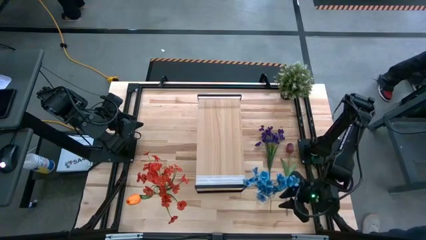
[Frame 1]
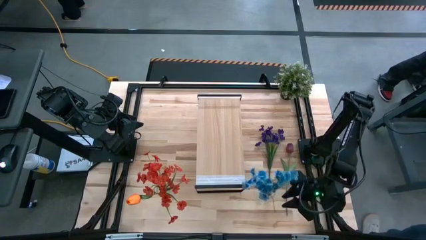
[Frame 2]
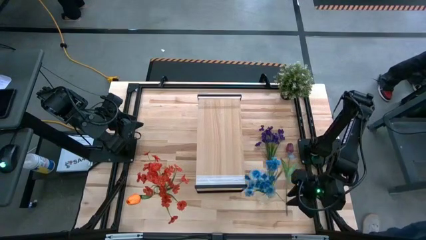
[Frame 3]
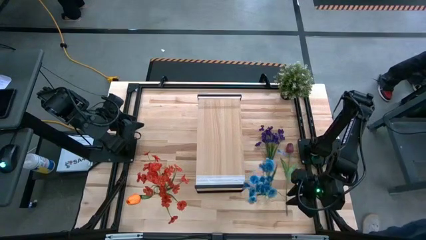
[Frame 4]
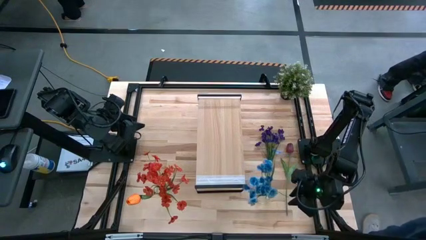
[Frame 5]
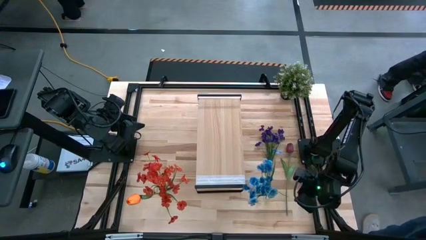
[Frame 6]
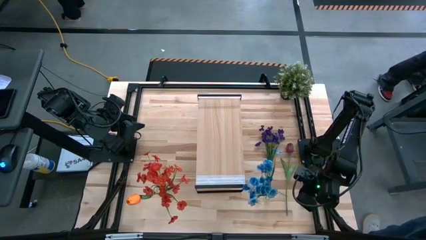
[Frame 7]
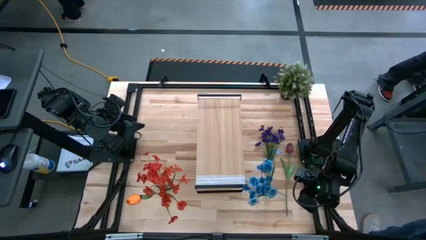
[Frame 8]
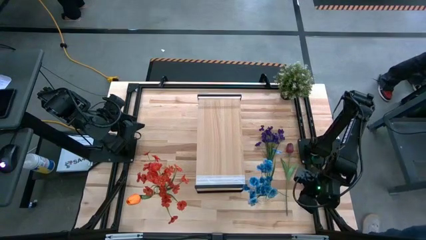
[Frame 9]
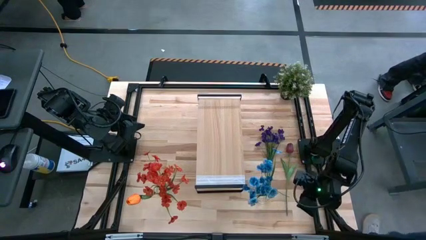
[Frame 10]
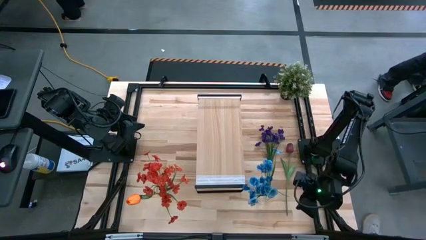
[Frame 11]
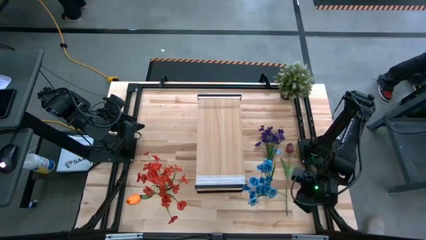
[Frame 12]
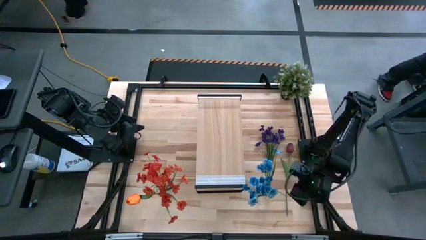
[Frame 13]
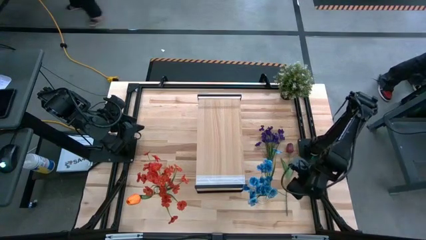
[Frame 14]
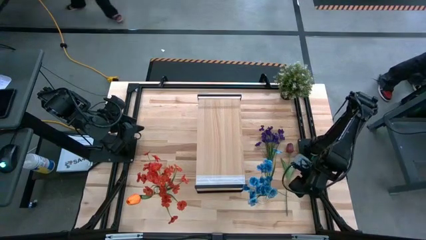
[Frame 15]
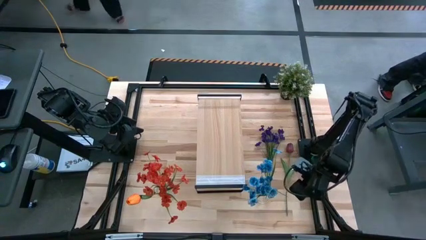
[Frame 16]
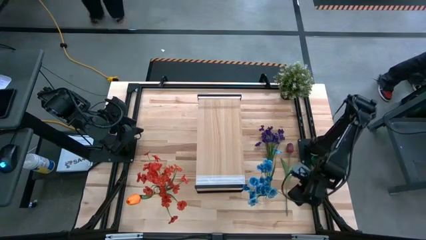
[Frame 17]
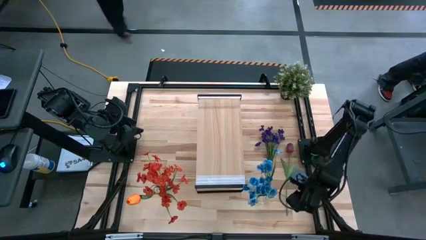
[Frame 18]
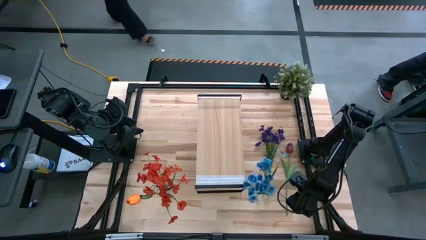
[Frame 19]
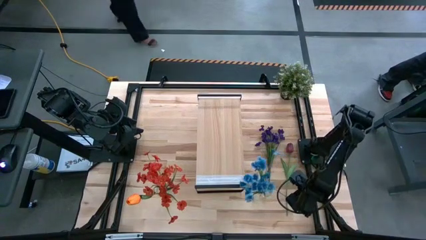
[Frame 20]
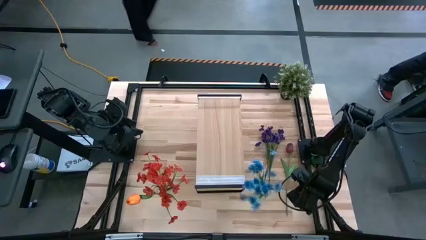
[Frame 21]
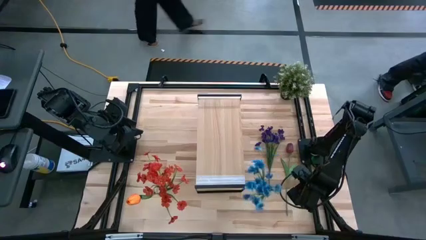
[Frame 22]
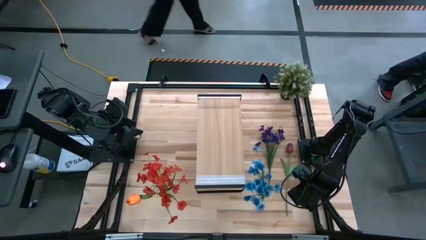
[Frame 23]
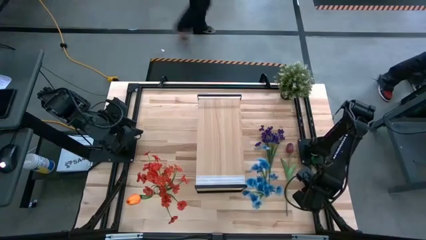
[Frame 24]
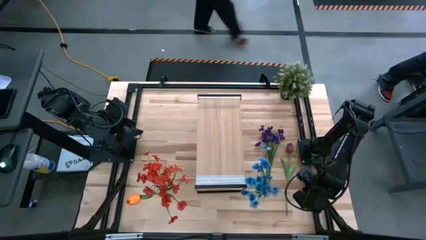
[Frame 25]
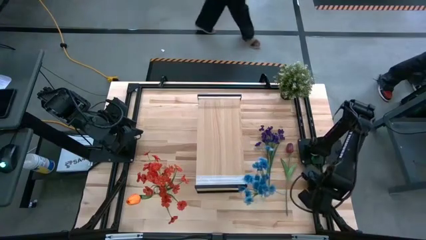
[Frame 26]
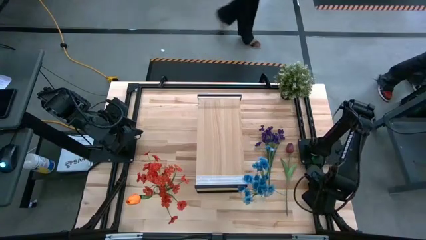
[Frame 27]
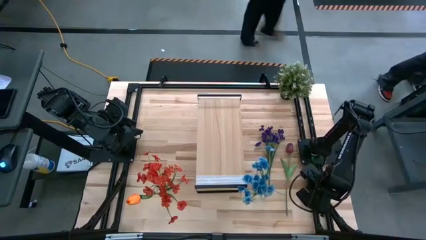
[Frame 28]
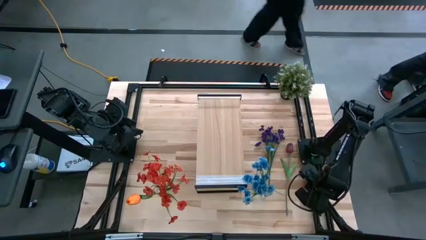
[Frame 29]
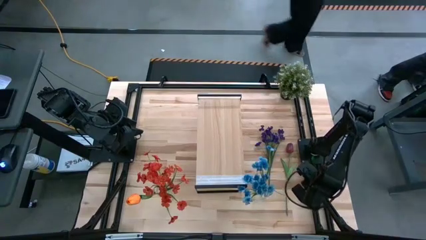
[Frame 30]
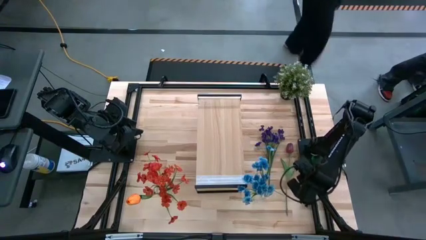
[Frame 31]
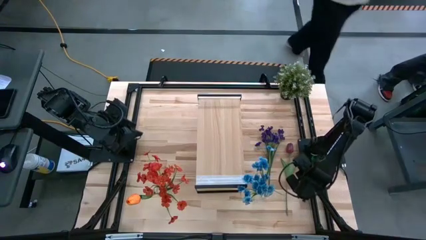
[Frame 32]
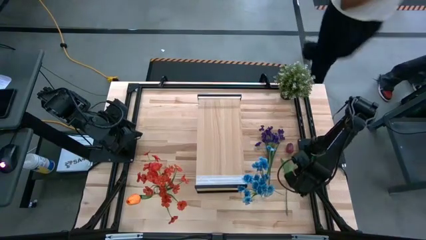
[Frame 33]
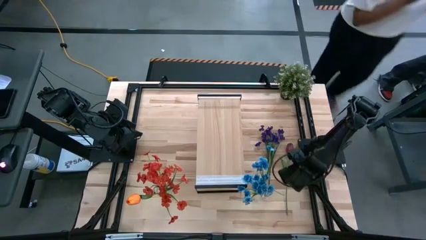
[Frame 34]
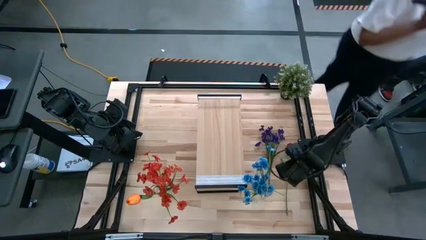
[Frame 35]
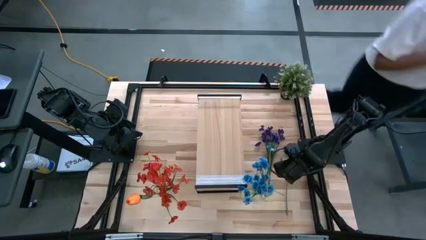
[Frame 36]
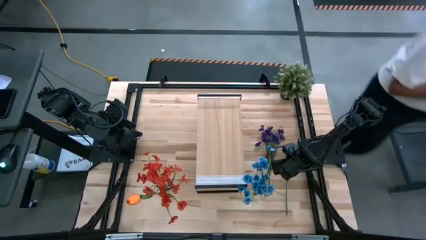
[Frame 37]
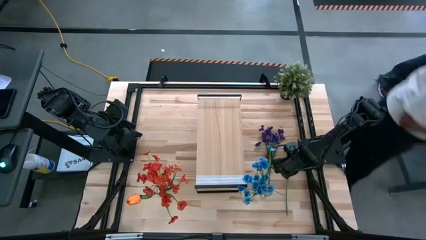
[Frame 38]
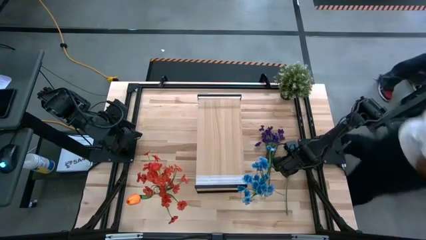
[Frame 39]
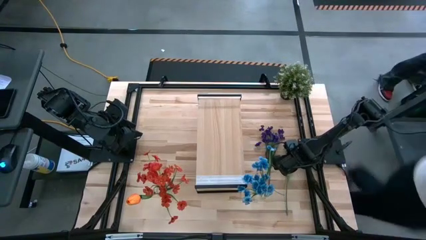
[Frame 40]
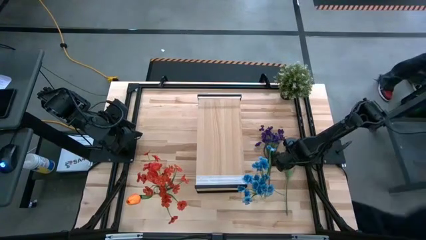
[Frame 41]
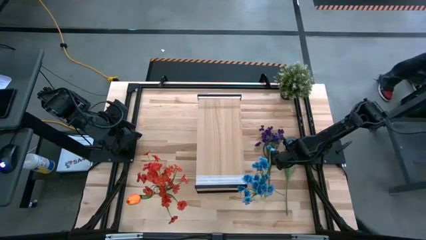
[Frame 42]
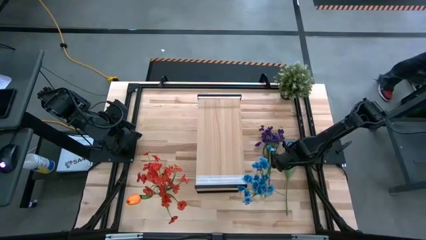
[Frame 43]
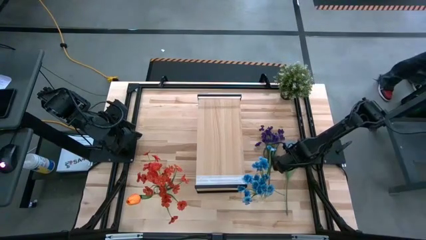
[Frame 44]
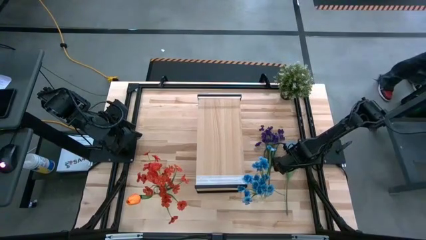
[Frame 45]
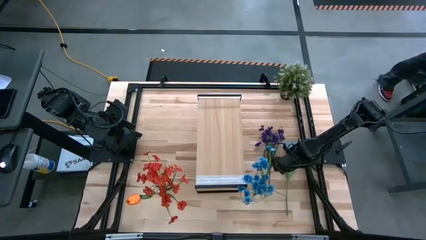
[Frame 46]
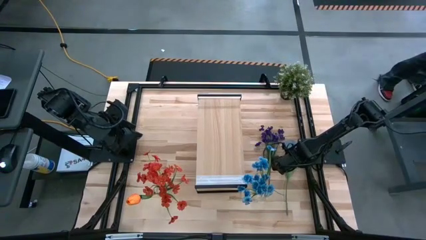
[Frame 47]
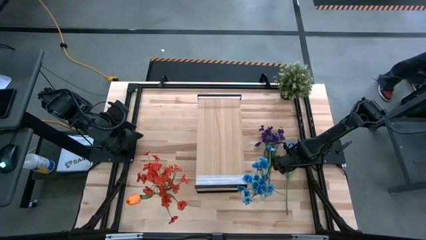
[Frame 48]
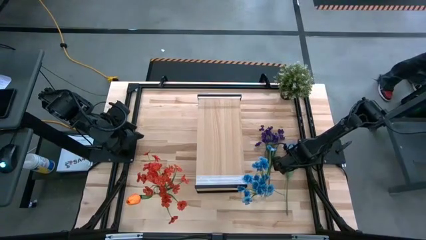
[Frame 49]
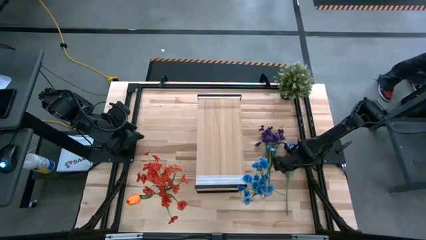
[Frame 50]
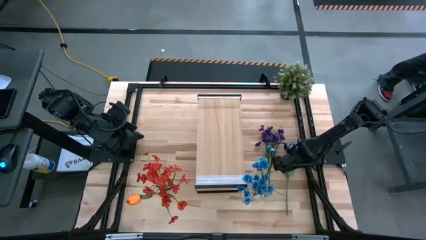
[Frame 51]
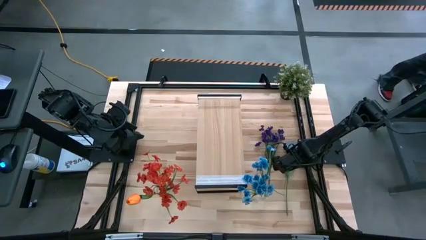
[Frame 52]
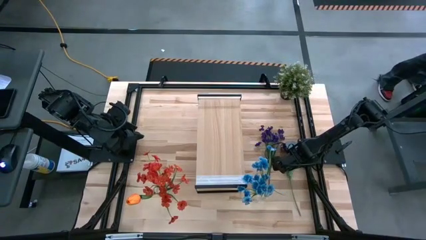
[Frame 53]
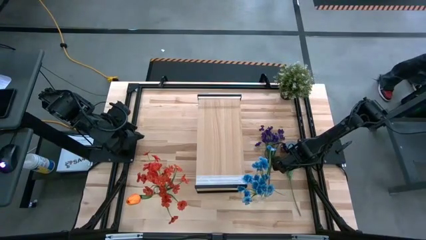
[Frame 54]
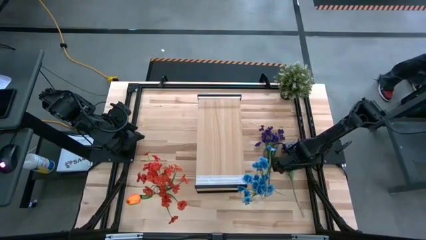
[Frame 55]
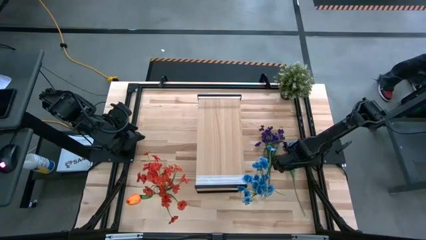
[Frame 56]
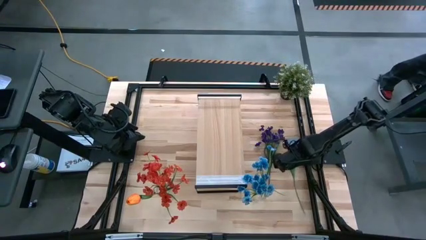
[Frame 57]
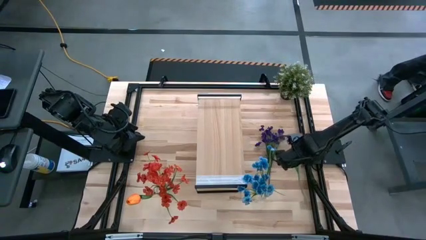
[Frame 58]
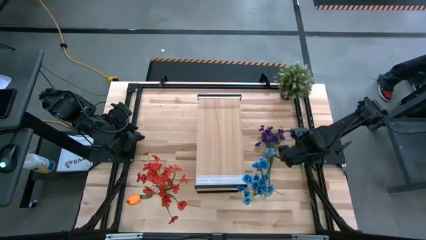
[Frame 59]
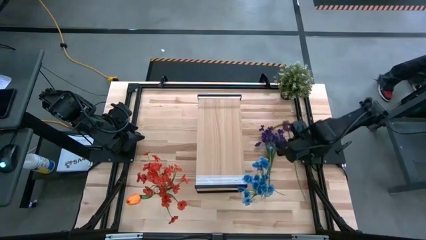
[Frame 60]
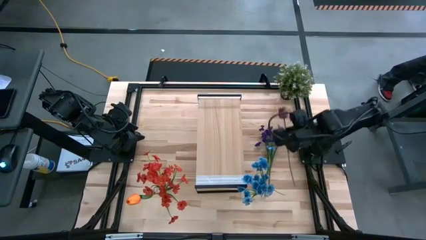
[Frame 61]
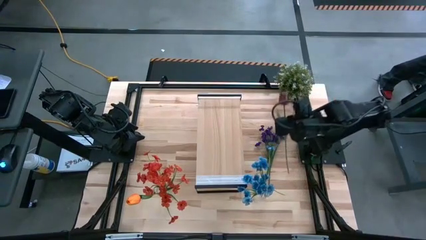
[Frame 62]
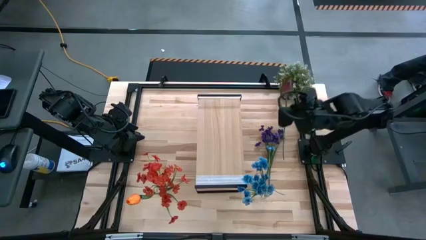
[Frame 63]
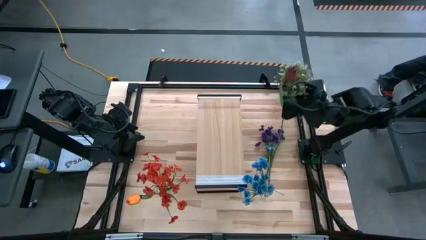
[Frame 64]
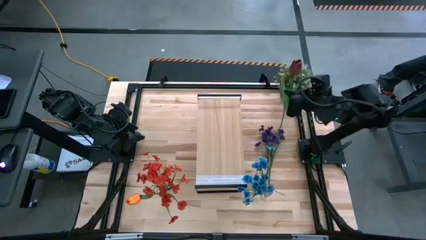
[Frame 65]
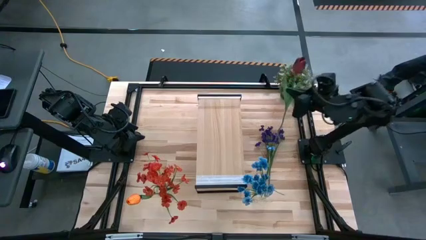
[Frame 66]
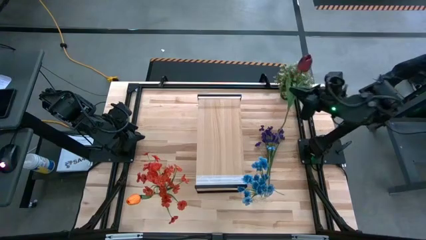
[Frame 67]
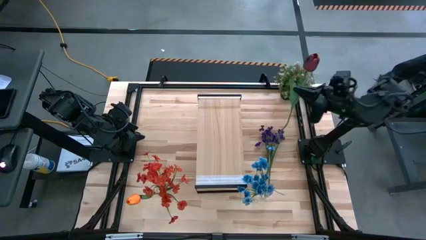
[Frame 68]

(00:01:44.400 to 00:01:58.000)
Task: Pick and place flowers into a vace then onto a shelf
Put the red flower into the right transparent vase

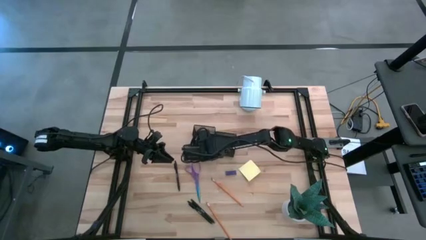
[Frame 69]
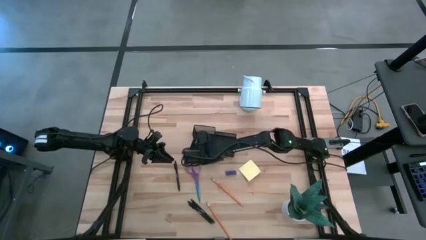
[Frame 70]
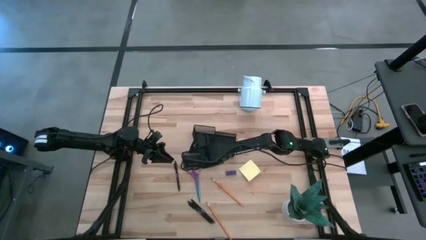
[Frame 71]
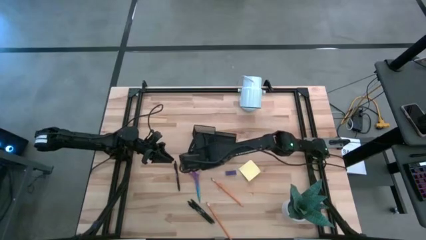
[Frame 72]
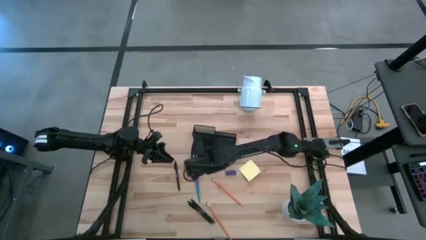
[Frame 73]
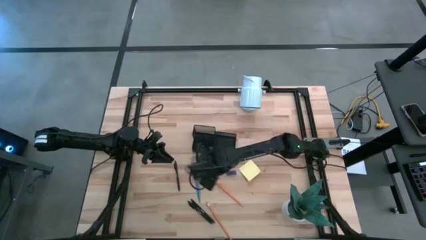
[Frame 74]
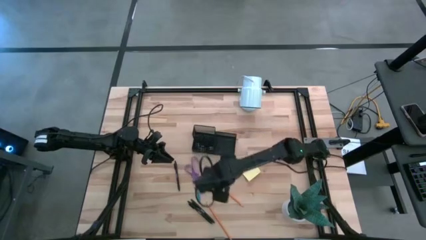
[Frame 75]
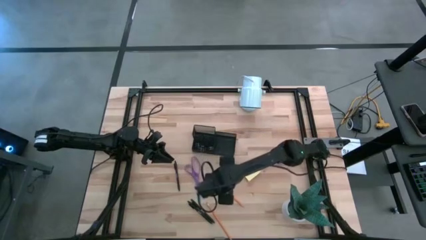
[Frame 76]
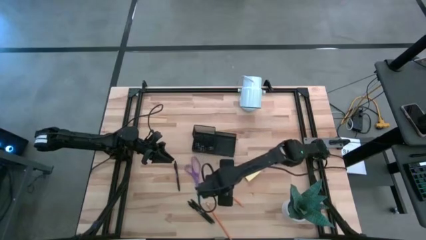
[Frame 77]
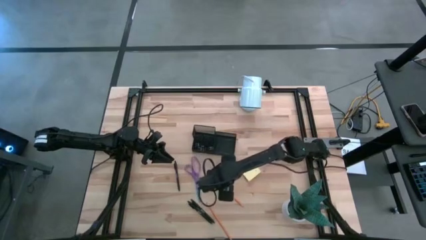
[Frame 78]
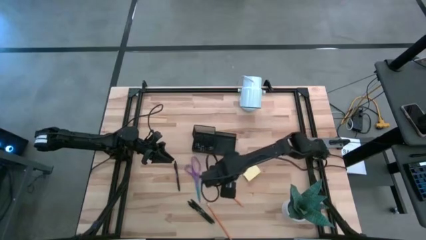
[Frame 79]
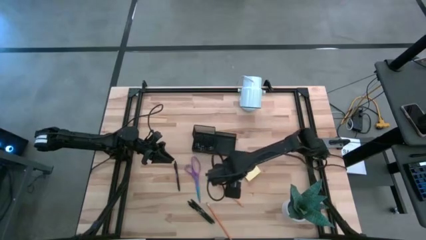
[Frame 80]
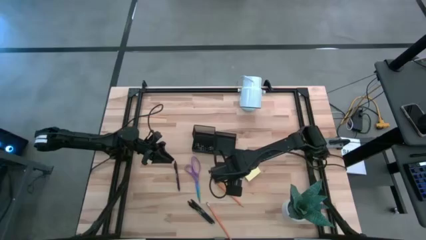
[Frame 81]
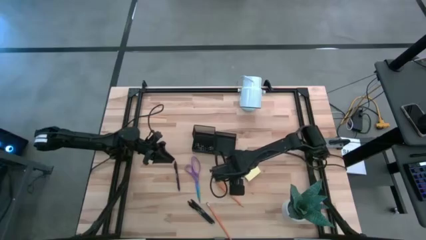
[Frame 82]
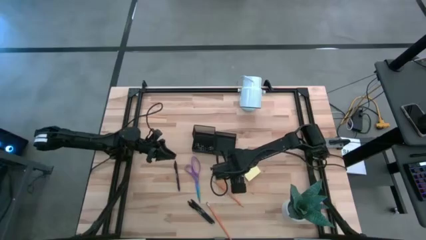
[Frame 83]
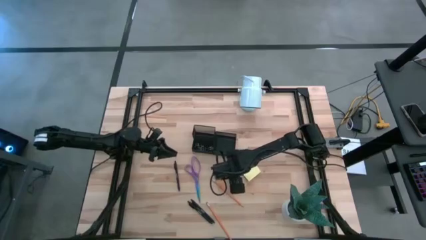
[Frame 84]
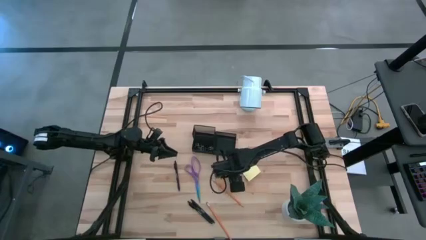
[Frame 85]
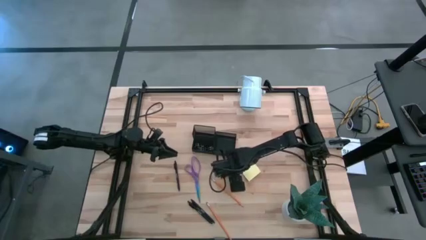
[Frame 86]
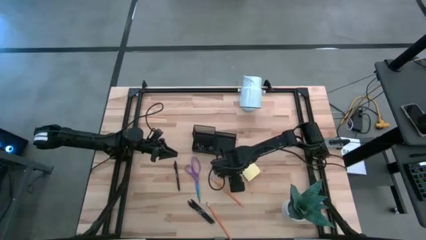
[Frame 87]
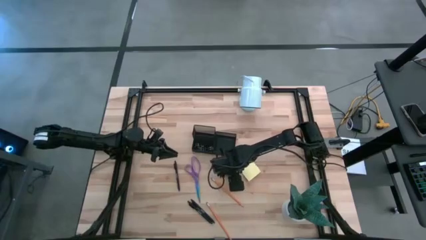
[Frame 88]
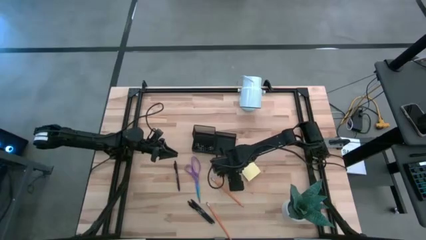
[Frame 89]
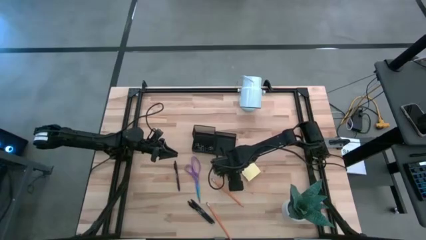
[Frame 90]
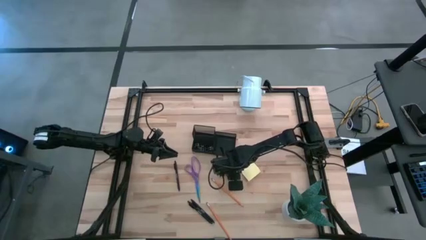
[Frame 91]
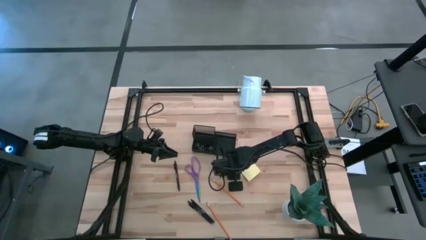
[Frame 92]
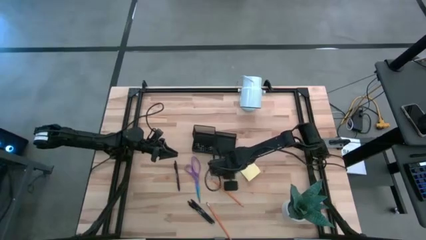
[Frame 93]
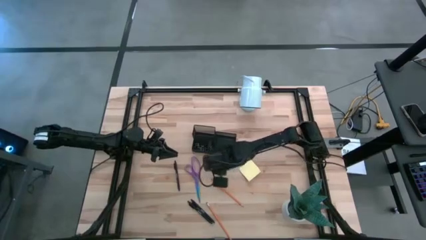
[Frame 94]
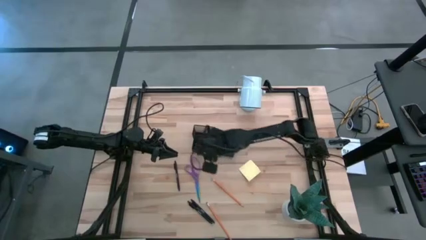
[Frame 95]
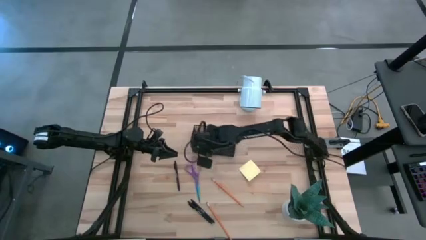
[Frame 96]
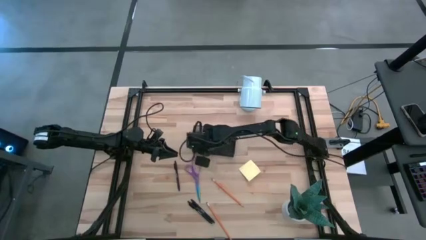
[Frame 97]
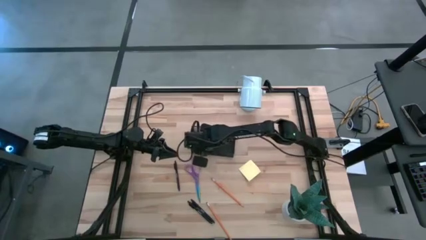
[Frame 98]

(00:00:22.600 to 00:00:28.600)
Task: Pick and place office supplies into organizer
Put the blue eraser into the desk organizer
